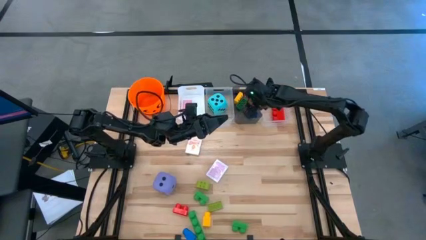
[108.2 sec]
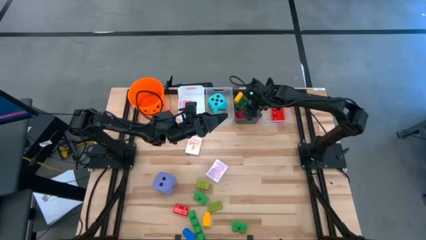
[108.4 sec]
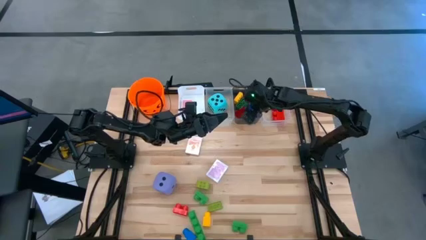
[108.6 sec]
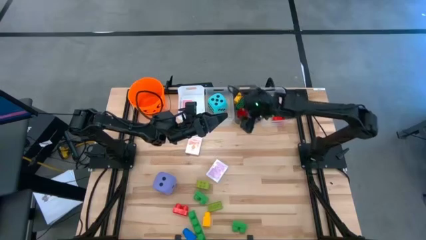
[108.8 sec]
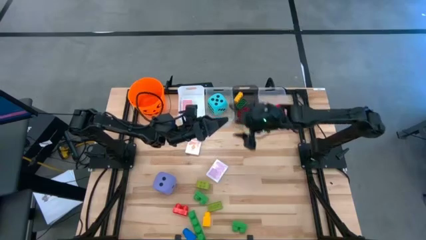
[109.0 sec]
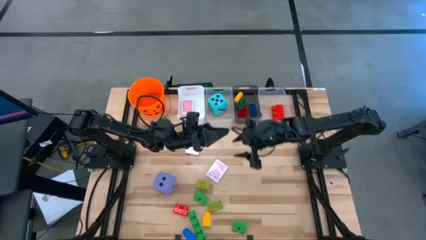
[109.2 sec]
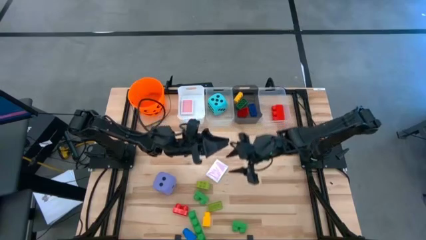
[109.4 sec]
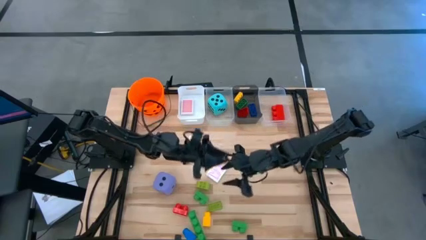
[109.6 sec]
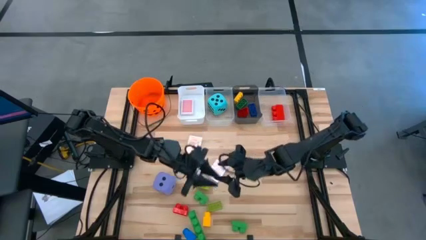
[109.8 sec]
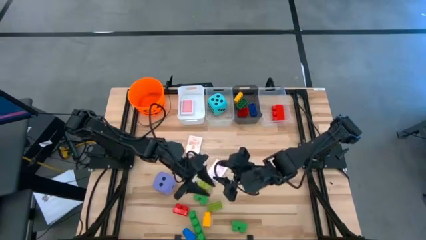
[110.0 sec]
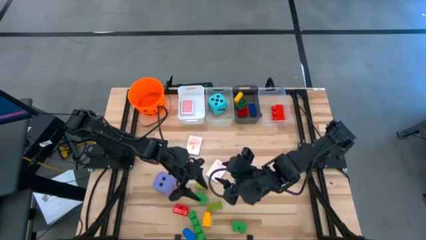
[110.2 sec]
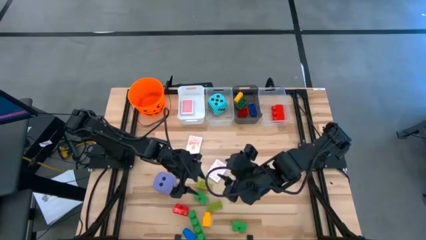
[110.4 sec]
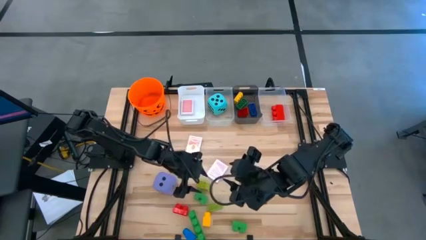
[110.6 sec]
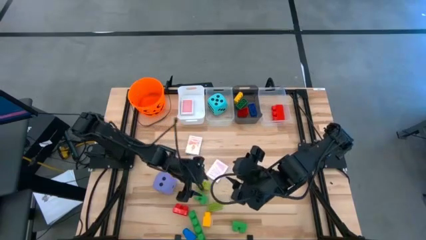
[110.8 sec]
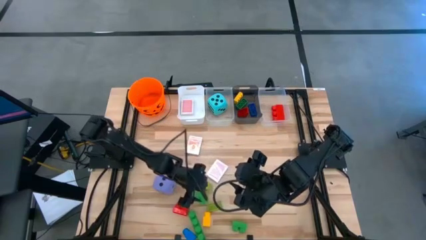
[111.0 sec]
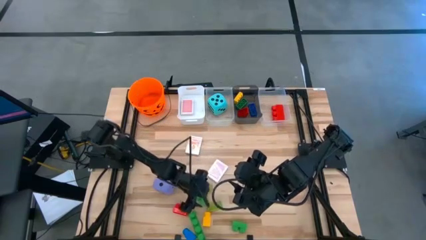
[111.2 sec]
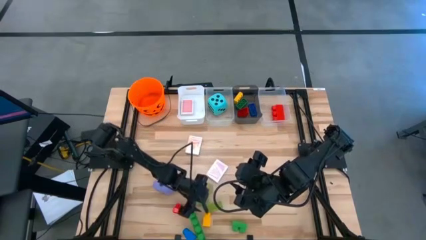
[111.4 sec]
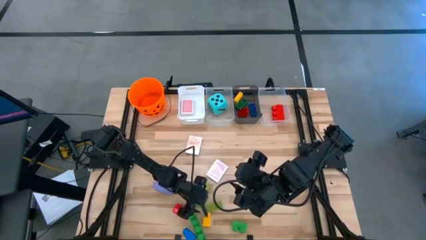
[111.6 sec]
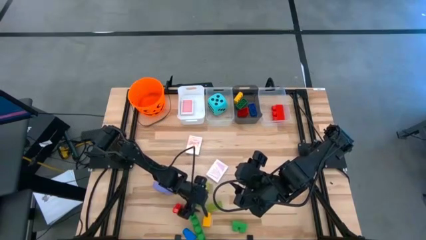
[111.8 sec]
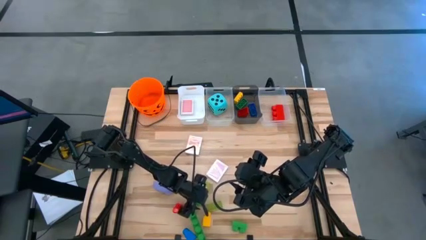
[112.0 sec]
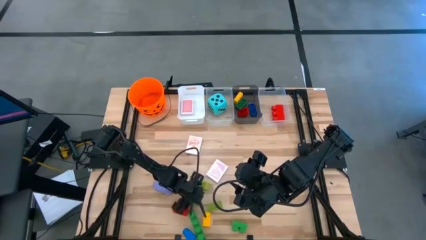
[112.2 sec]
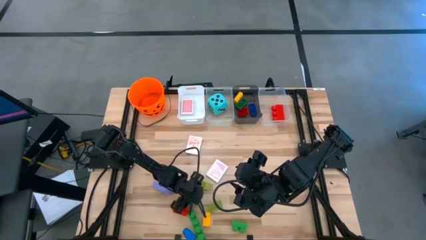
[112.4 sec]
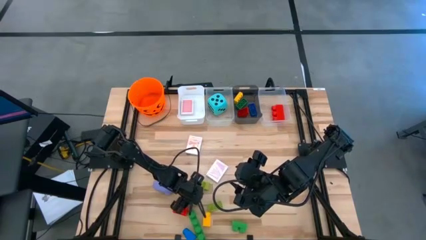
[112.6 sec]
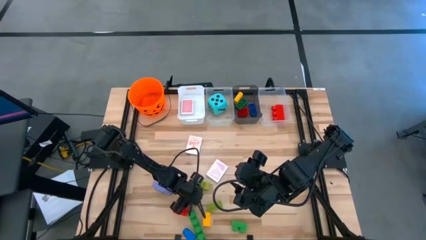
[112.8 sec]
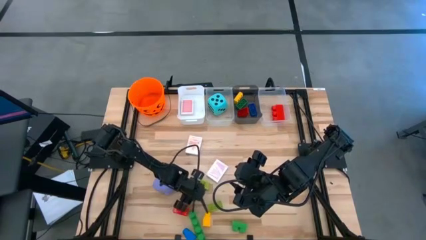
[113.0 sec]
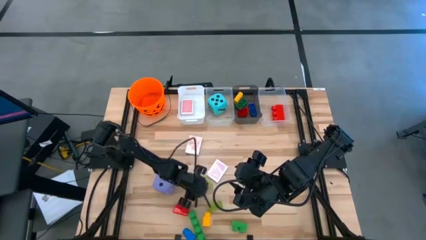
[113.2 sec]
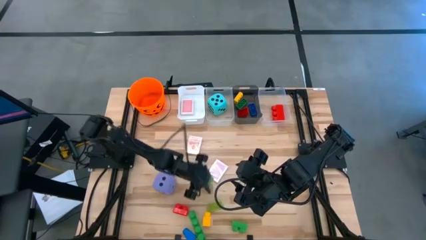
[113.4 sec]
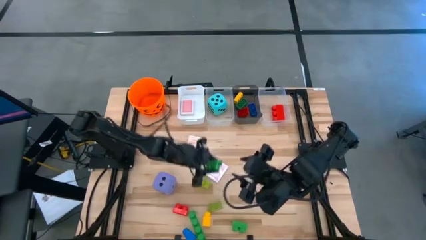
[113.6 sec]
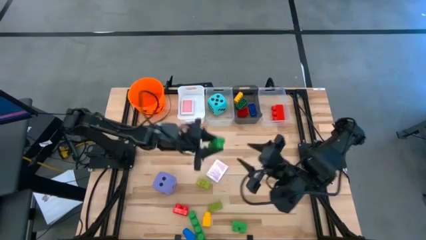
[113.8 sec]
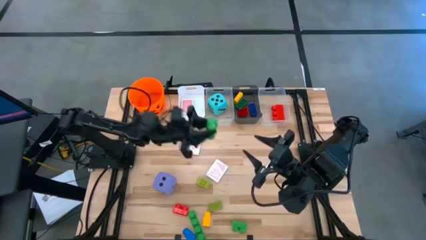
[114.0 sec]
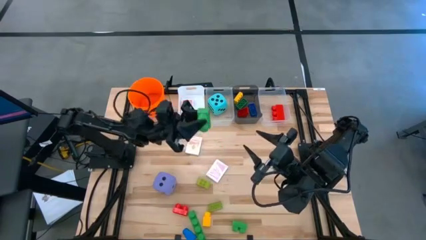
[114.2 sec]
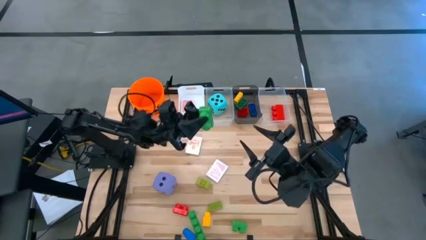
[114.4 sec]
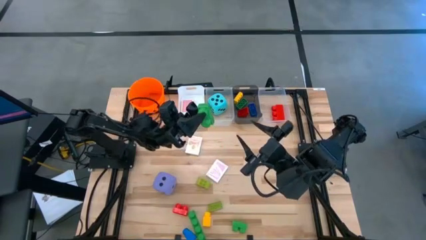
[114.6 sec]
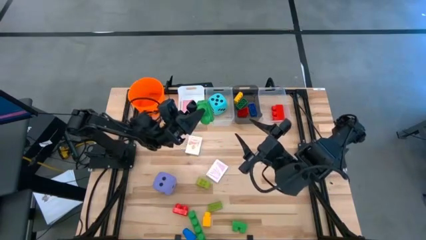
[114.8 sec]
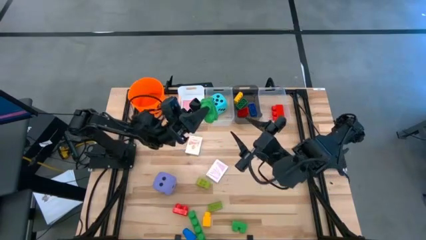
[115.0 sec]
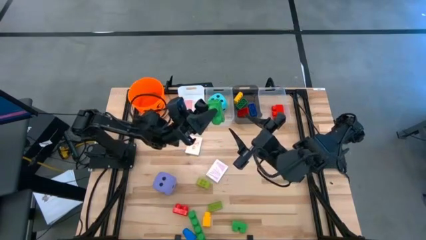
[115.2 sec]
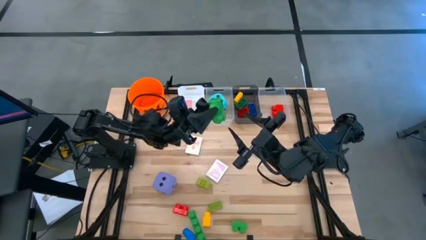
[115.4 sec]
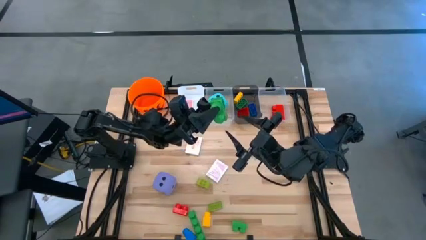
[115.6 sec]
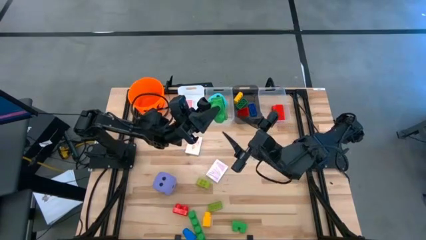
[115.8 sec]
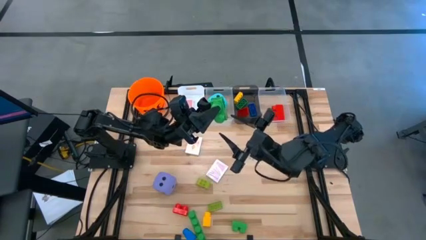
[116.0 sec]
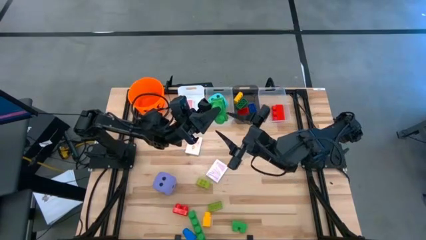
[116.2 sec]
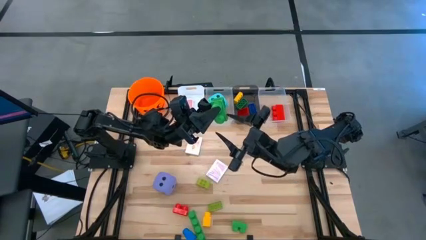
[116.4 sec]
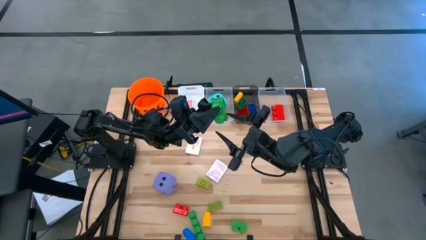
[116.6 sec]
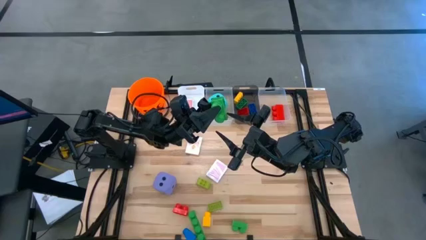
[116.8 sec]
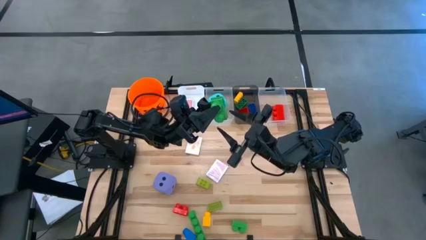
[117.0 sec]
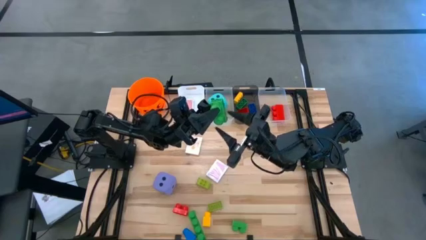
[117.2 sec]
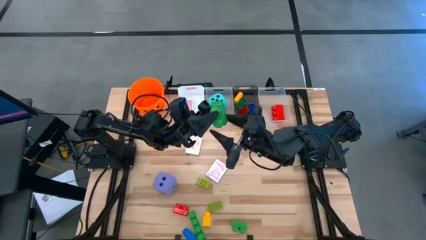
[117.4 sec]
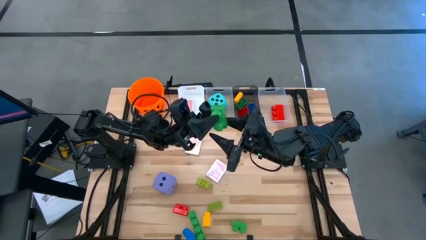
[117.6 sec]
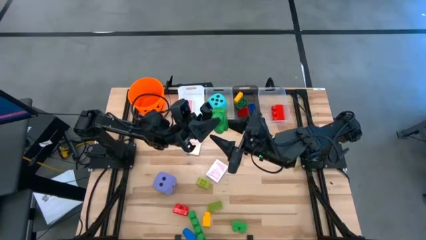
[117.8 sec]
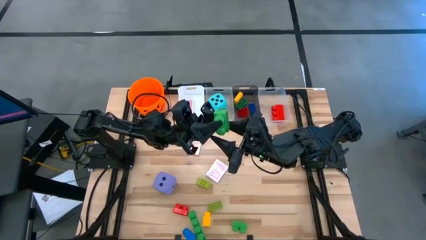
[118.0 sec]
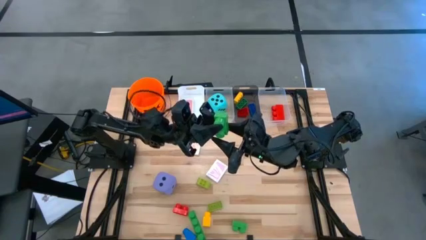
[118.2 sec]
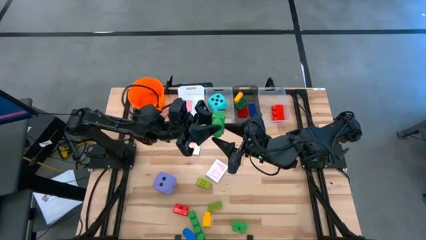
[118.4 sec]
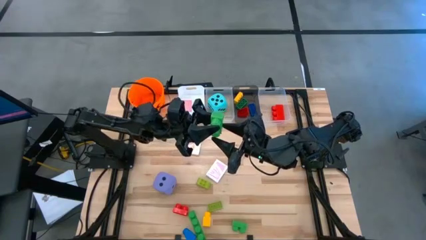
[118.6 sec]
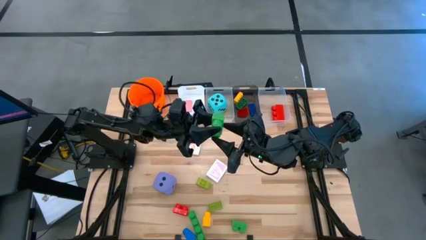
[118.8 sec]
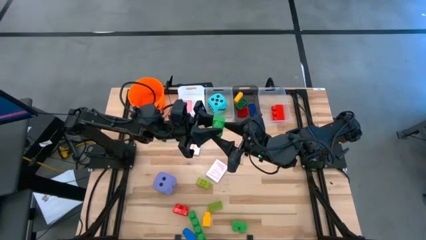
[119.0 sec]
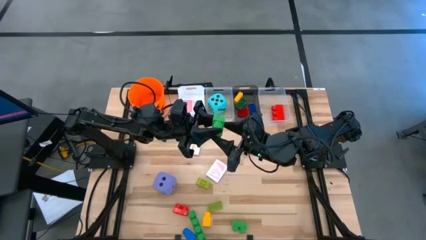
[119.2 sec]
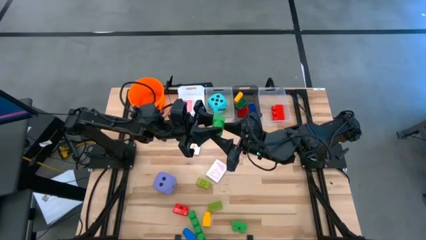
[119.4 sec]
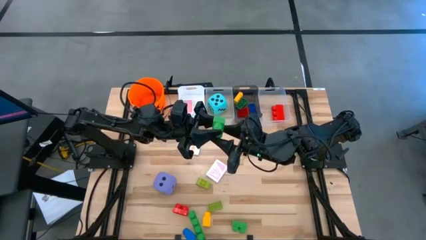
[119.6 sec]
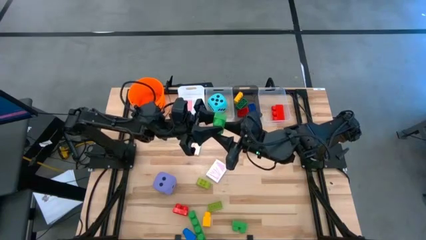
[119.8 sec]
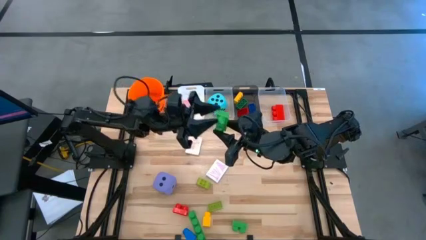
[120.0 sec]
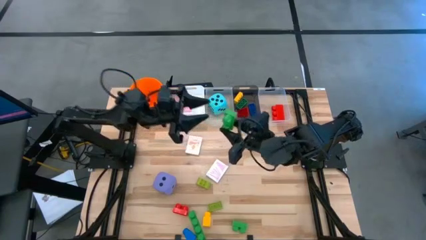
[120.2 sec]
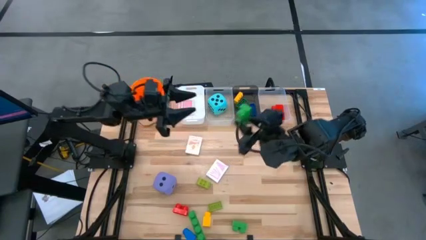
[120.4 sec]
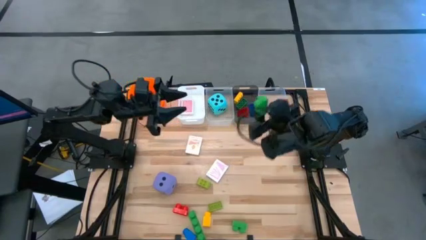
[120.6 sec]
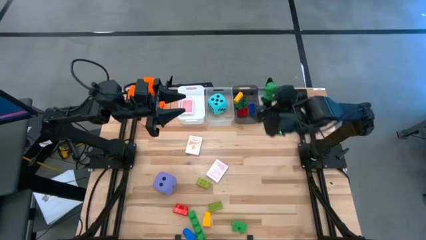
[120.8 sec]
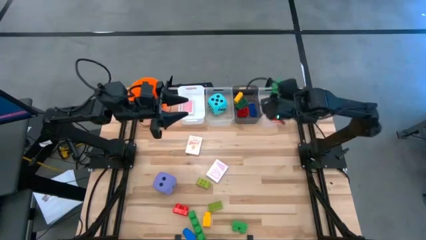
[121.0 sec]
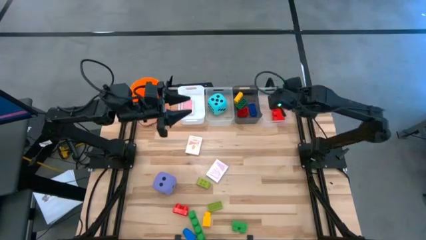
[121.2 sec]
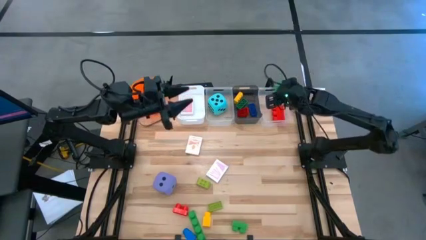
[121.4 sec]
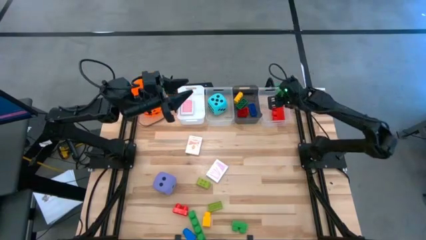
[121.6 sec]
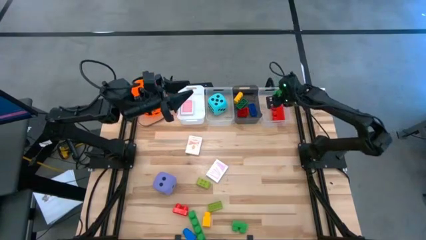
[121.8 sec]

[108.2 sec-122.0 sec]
Task: Pick & Place Toys
Put the large green game piece into the right transparent bin
